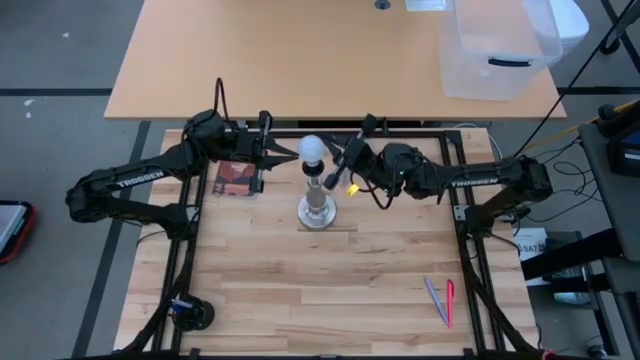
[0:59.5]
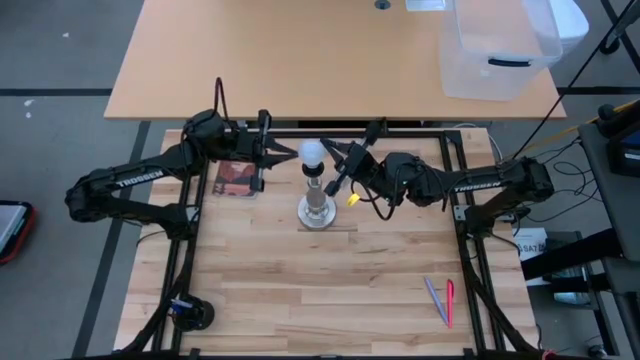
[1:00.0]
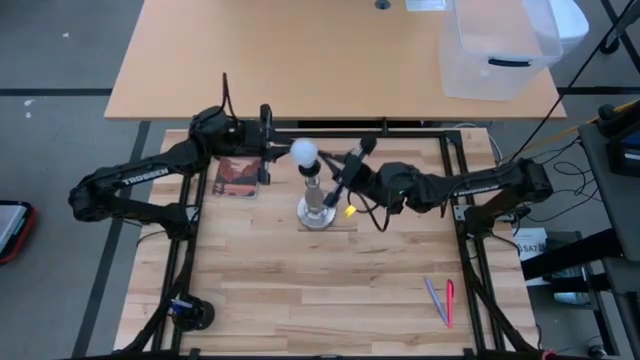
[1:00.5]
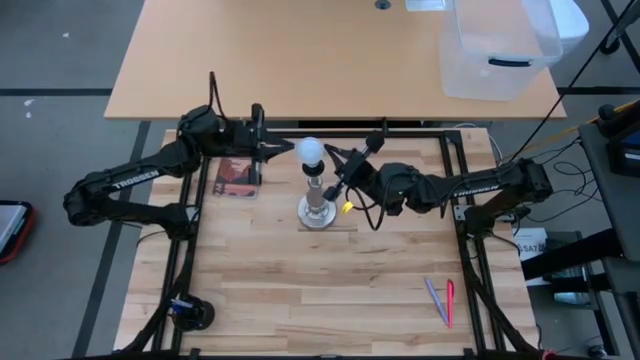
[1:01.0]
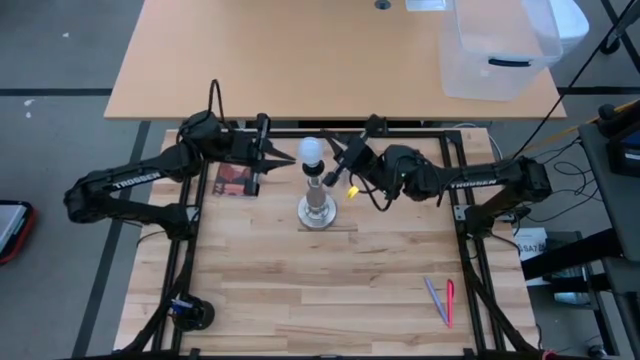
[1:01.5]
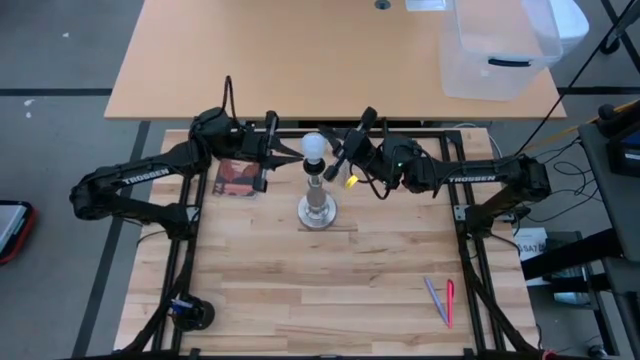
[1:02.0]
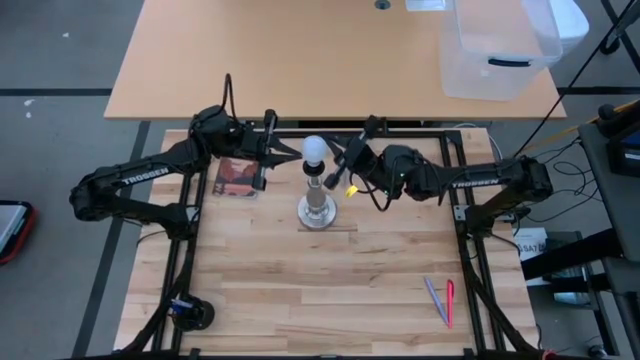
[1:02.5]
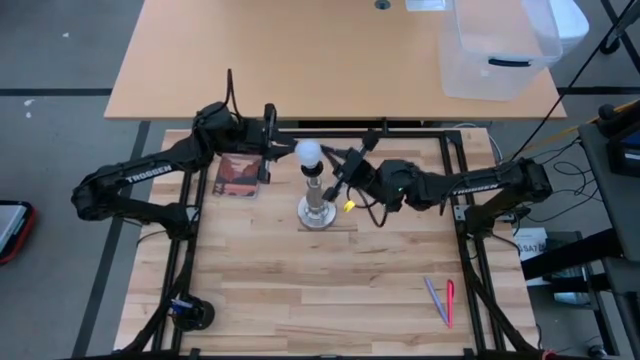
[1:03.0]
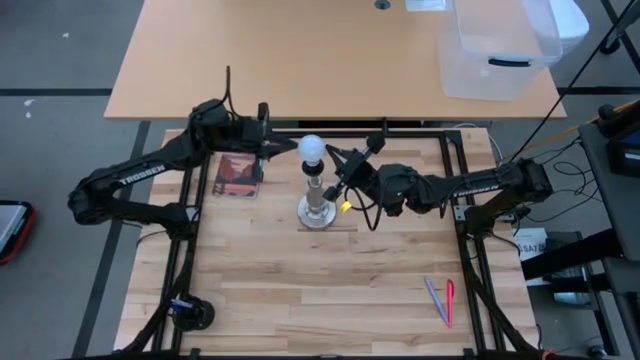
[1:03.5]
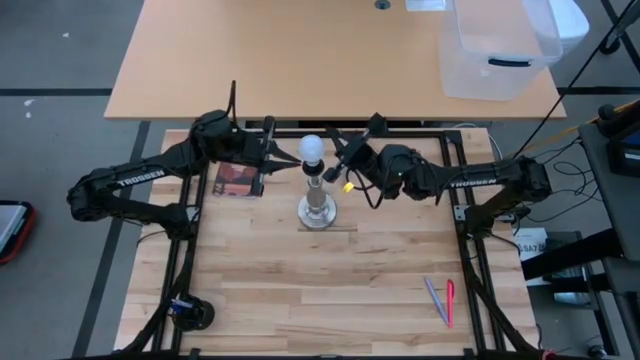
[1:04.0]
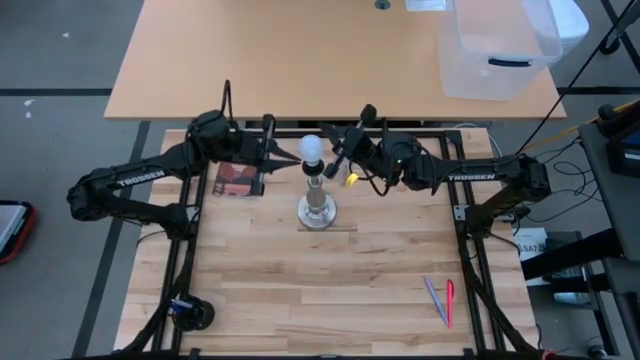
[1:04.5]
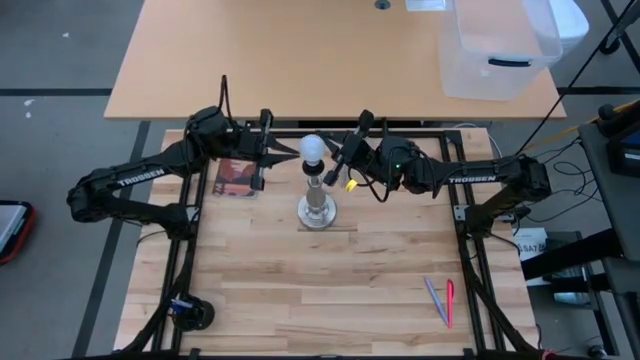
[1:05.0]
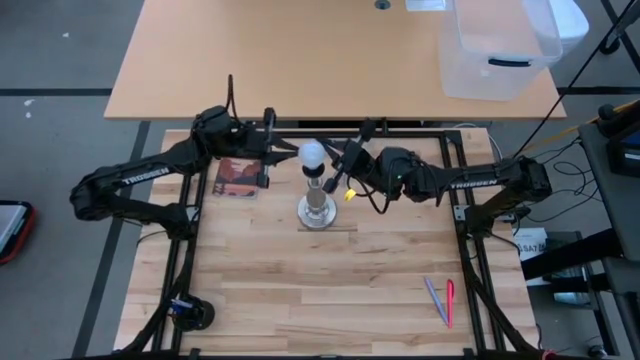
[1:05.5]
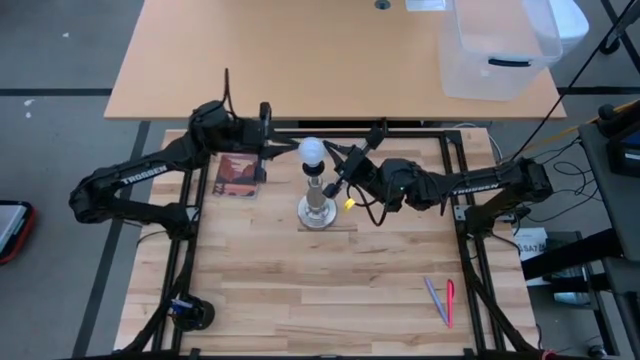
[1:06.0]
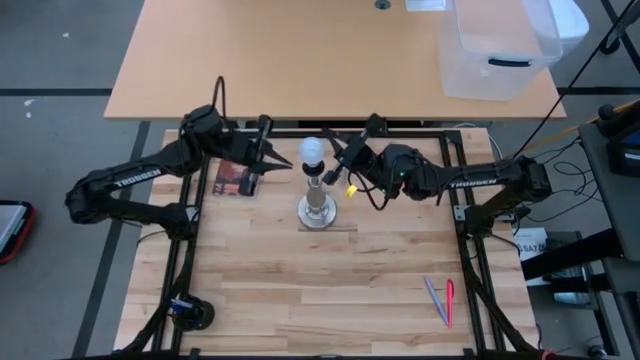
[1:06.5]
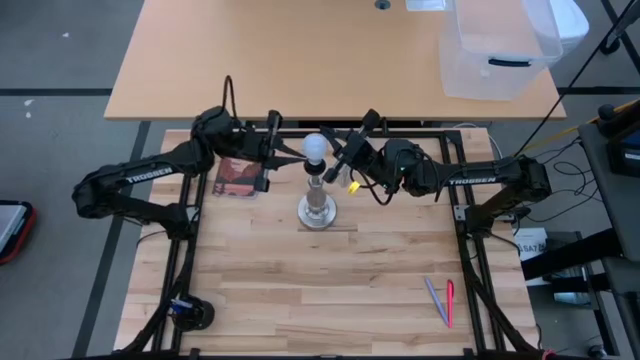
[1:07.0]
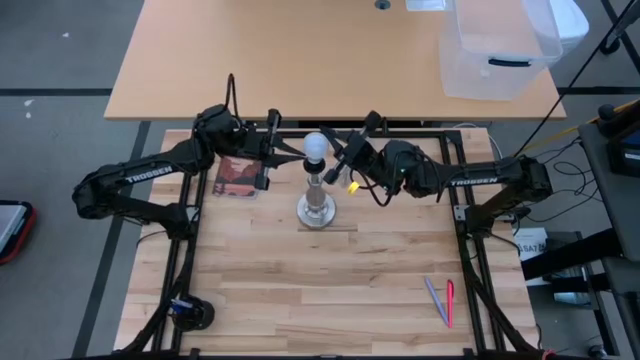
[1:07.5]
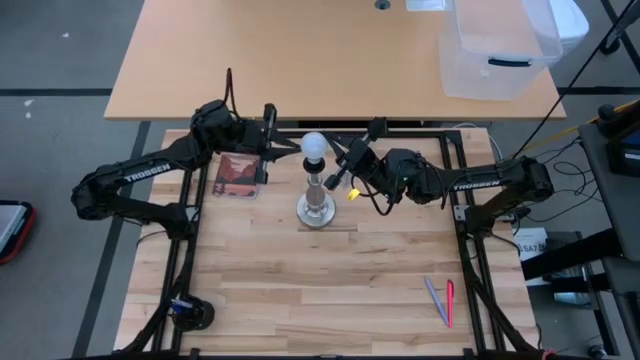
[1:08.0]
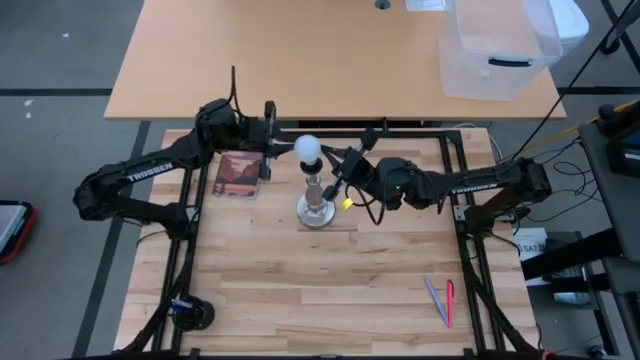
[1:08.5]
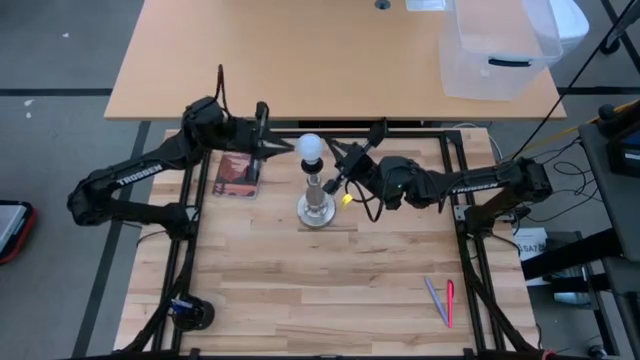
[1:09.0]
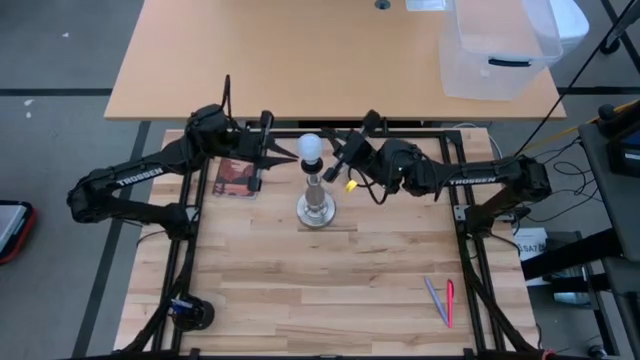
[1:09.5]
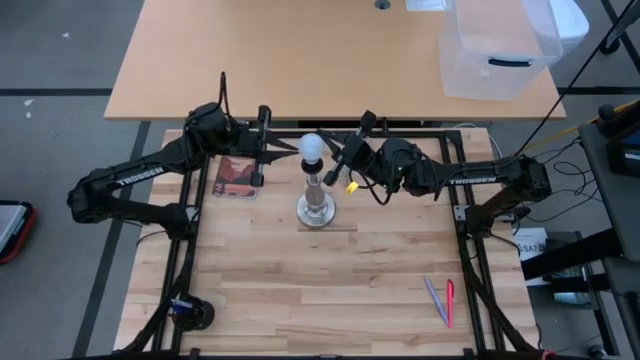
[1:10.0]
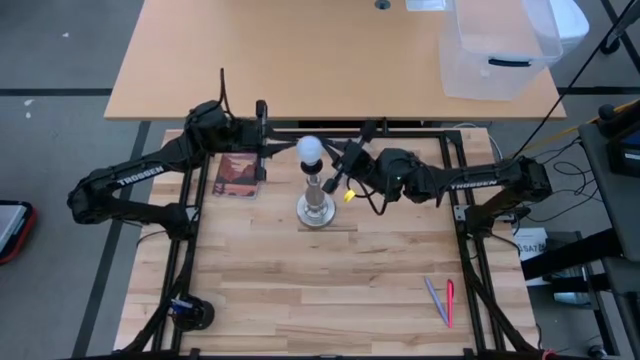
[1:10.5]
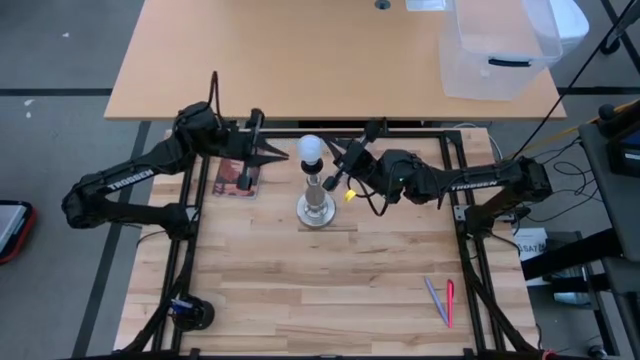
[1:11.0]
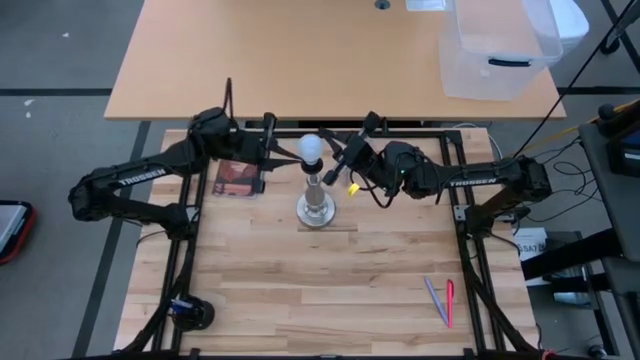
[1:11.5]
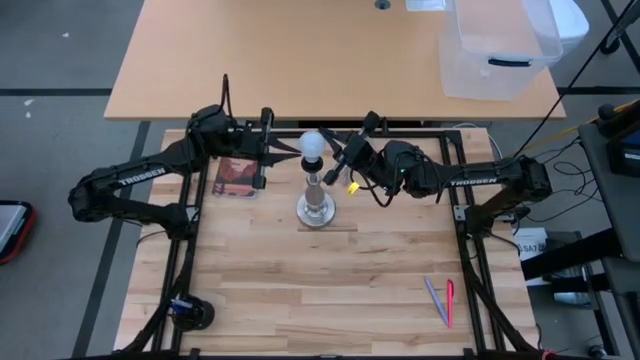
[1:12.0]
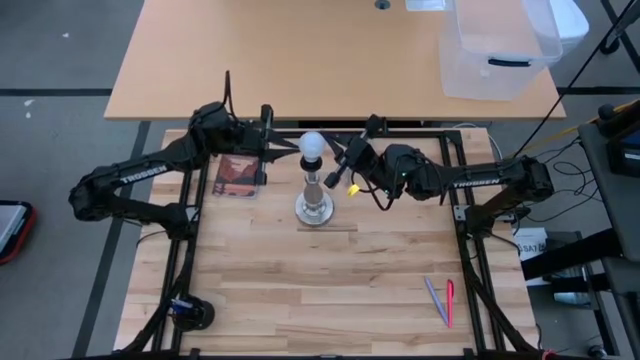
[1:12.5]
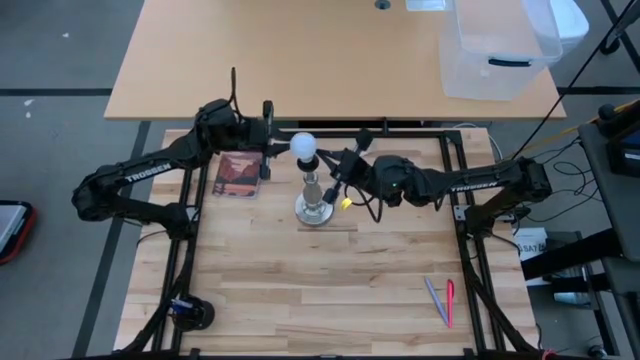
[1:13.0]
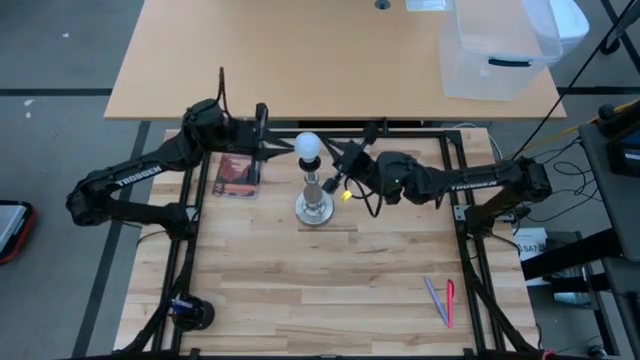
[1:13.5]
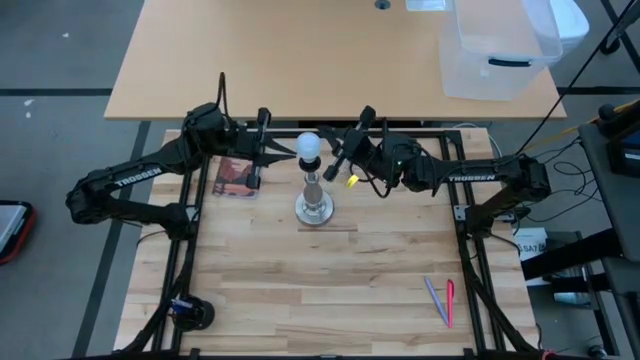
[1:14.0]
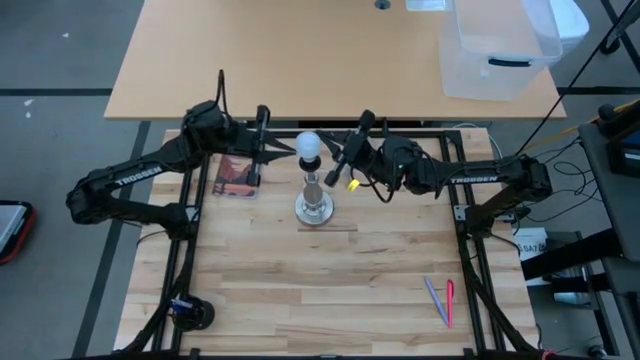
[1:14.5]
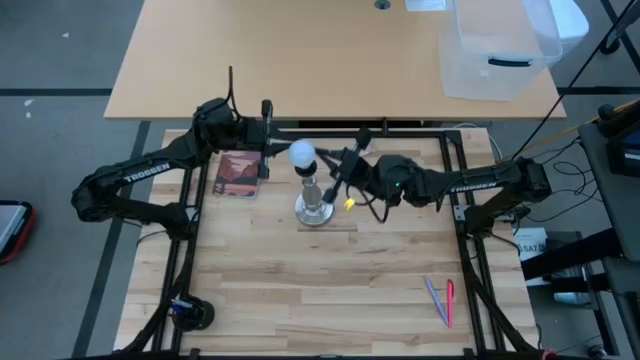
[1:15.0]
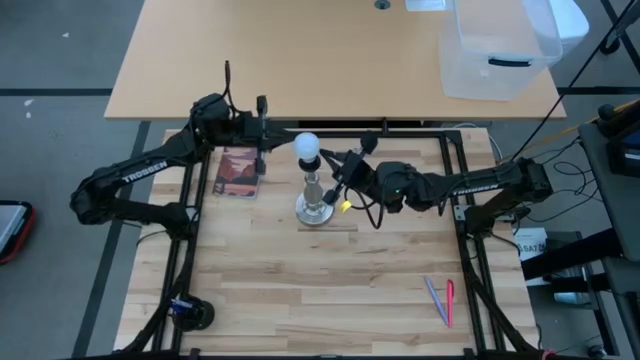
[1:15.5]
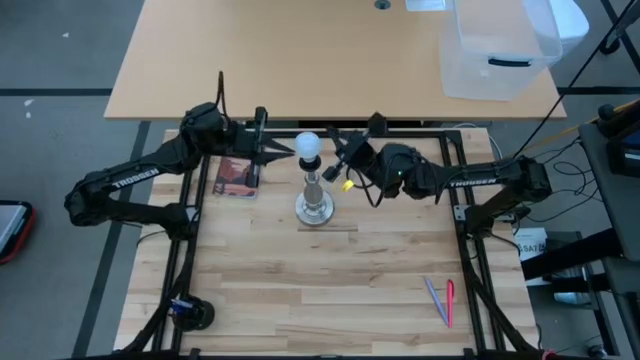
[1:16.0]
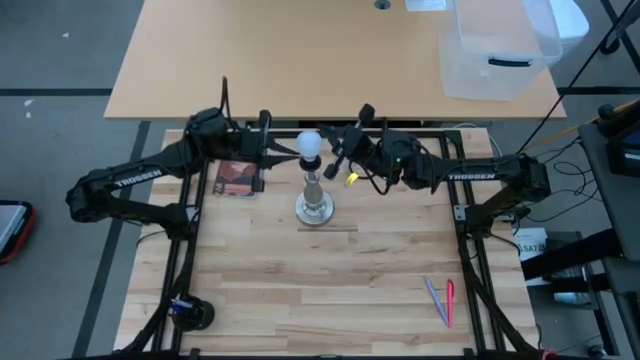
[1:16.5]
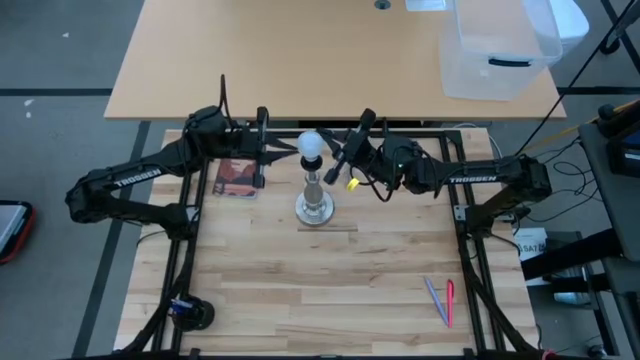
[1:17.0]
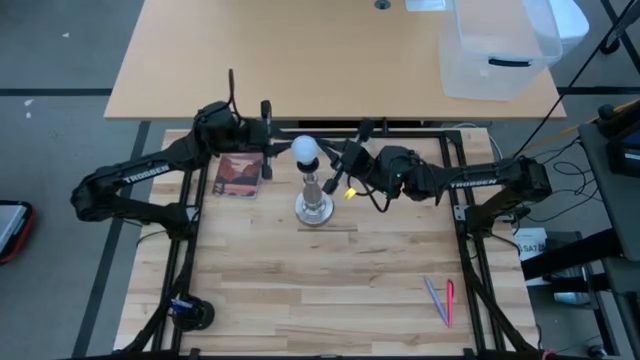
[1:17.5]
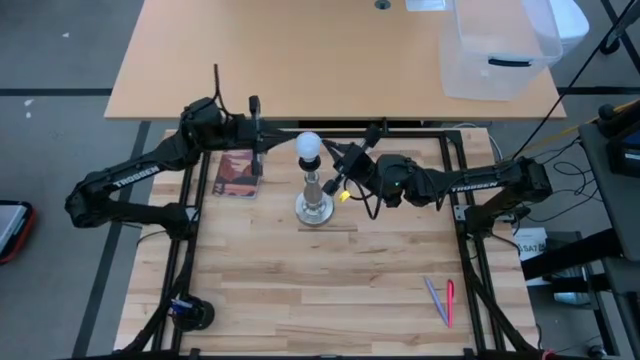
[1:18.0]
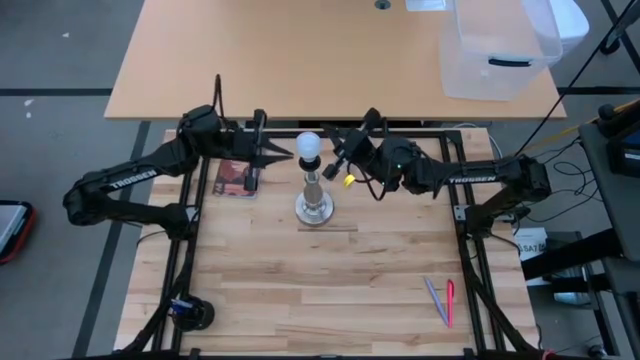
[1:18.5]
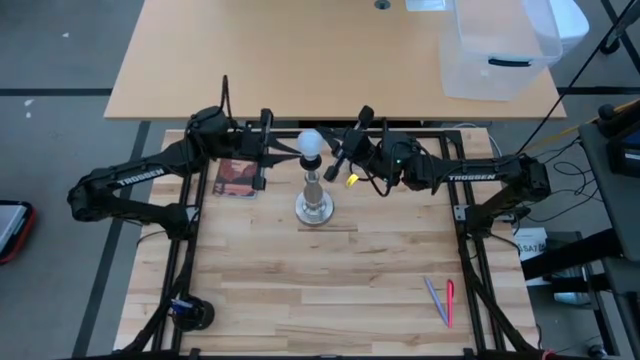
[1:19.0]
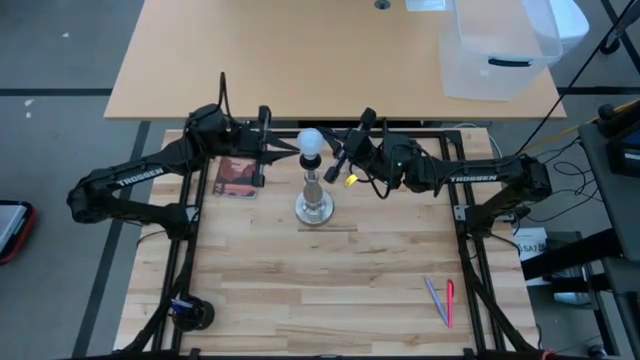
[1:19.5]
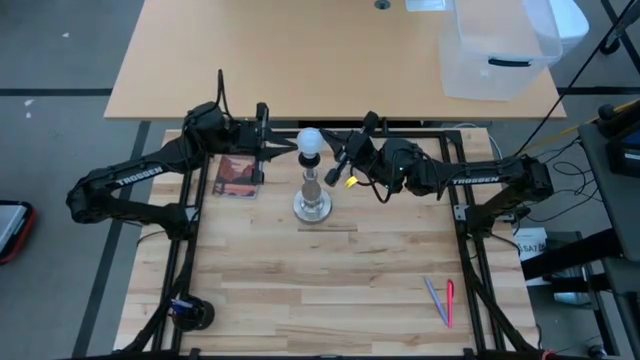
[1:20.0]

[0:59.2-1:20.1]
Task: Screw lightbulb
Insert the white lightbulb into the silver lamp
